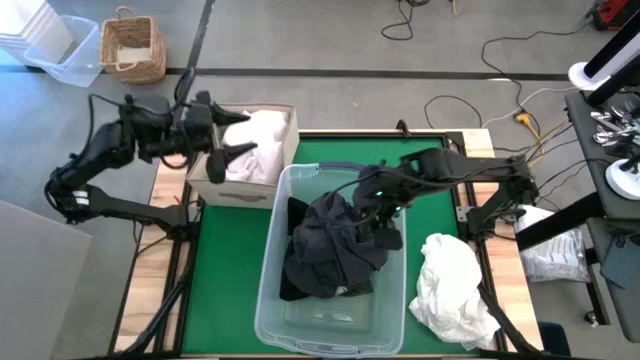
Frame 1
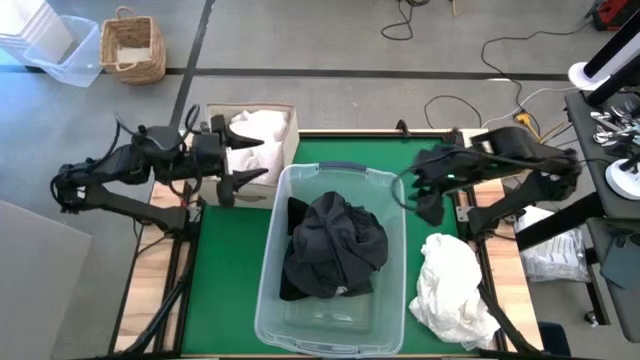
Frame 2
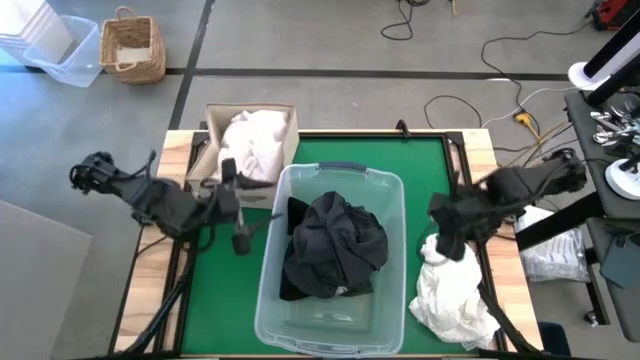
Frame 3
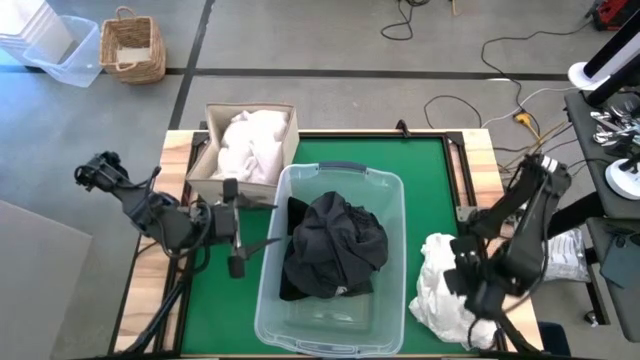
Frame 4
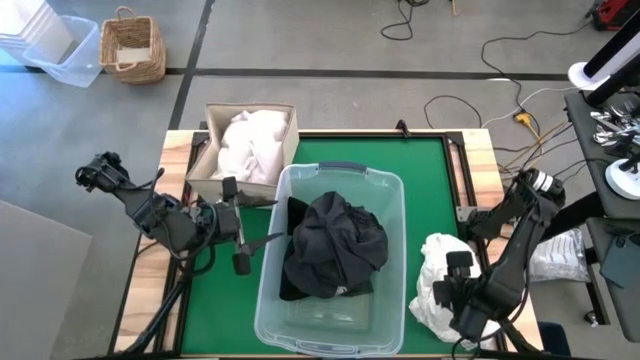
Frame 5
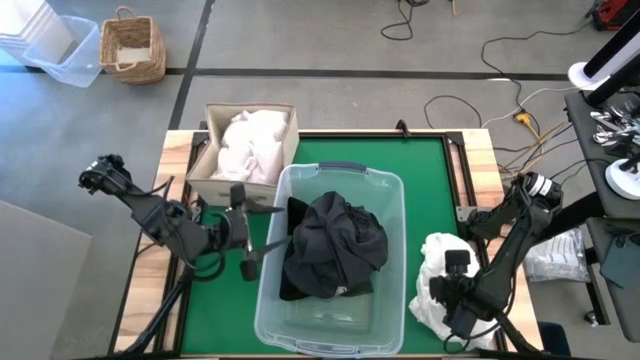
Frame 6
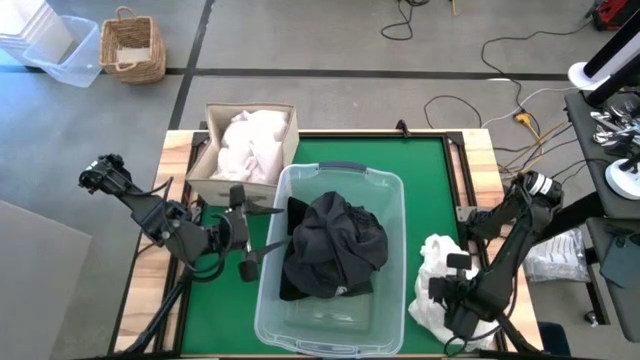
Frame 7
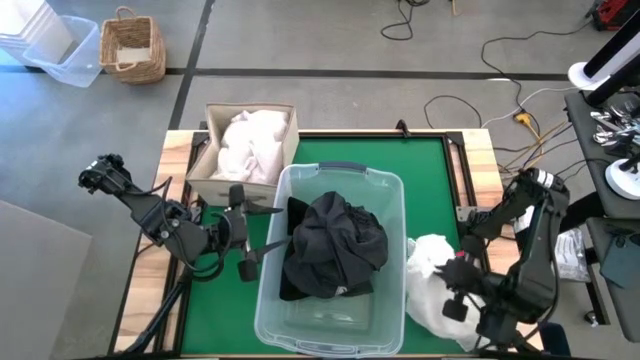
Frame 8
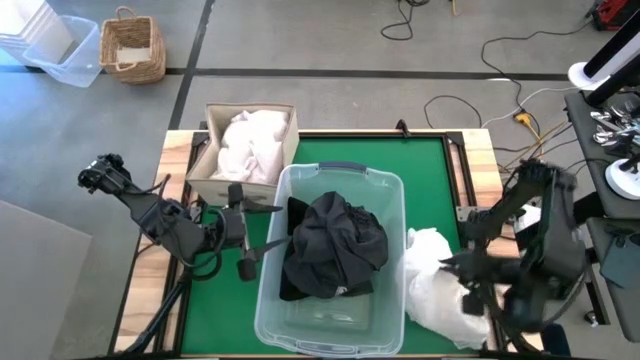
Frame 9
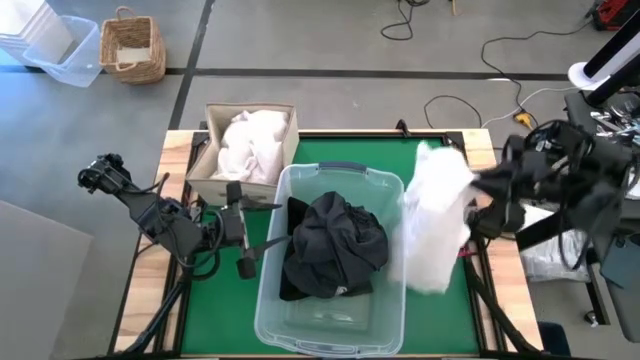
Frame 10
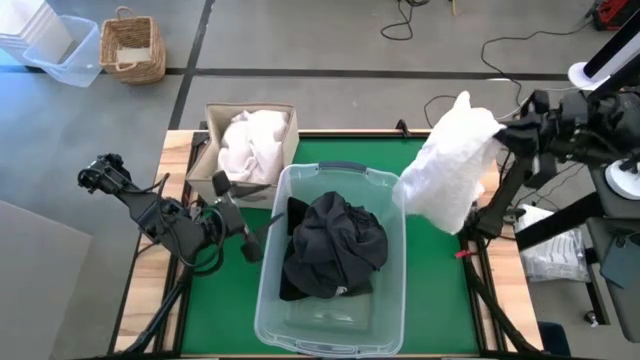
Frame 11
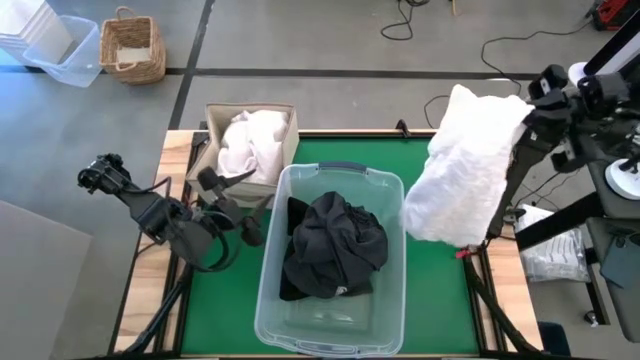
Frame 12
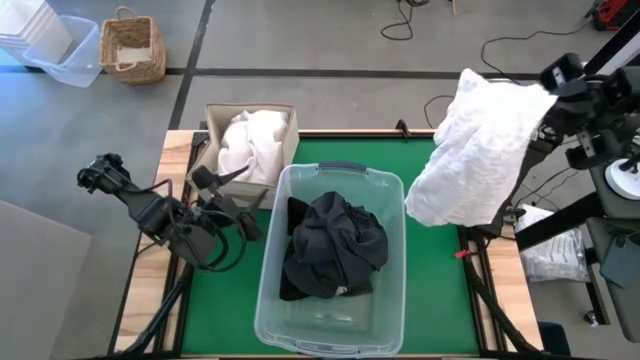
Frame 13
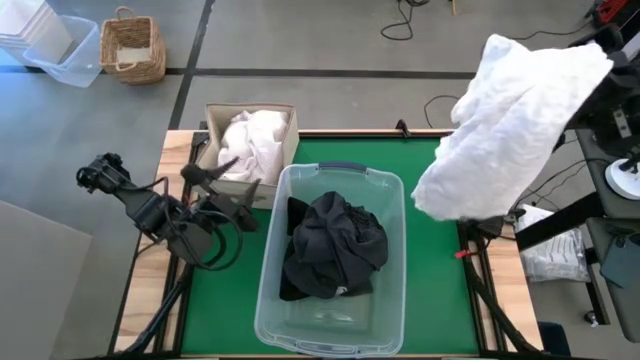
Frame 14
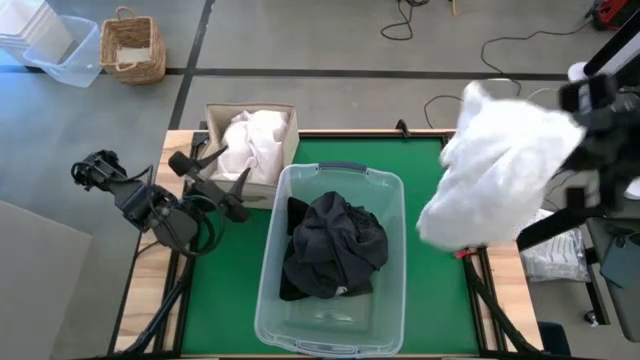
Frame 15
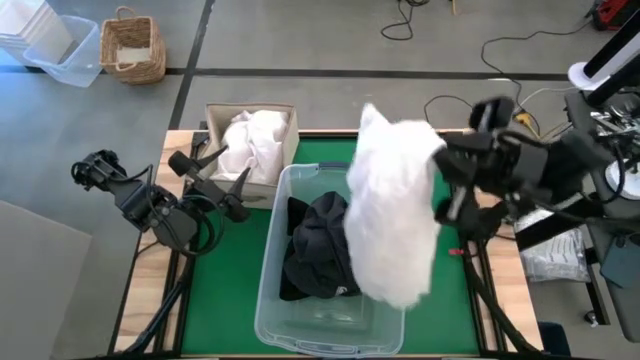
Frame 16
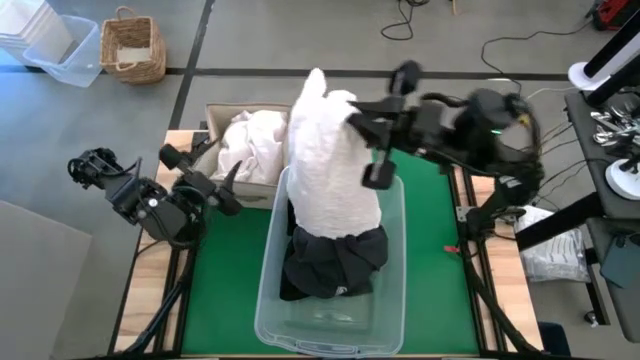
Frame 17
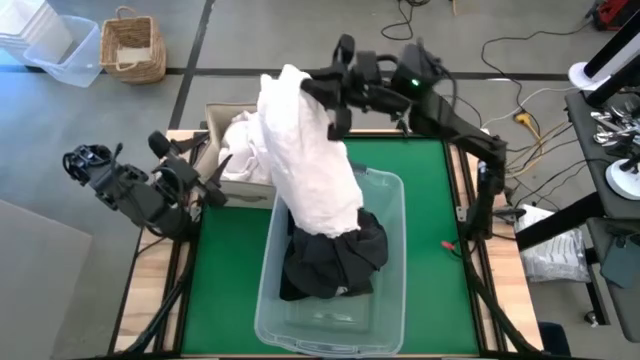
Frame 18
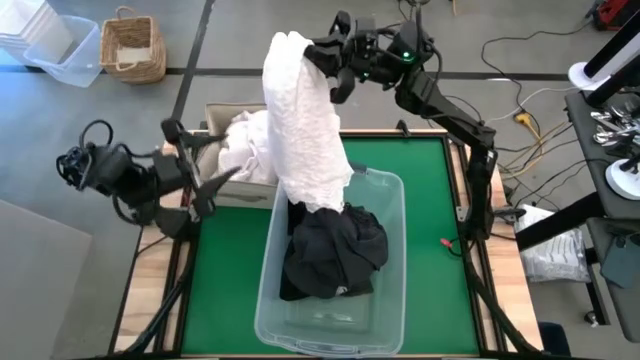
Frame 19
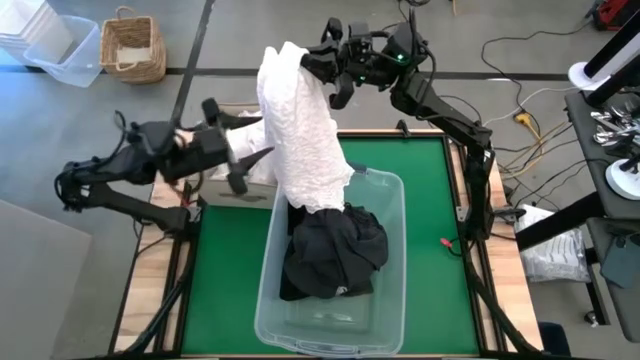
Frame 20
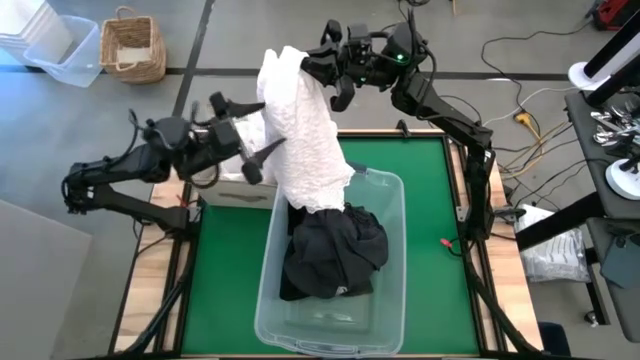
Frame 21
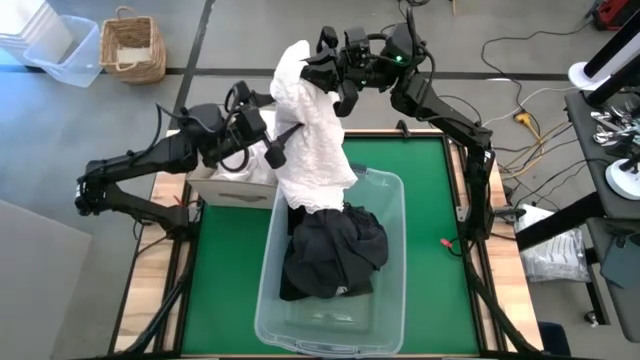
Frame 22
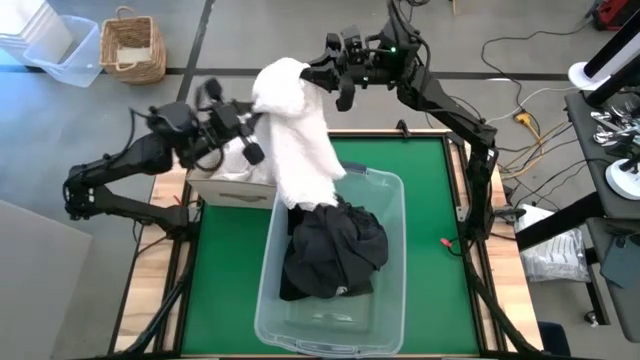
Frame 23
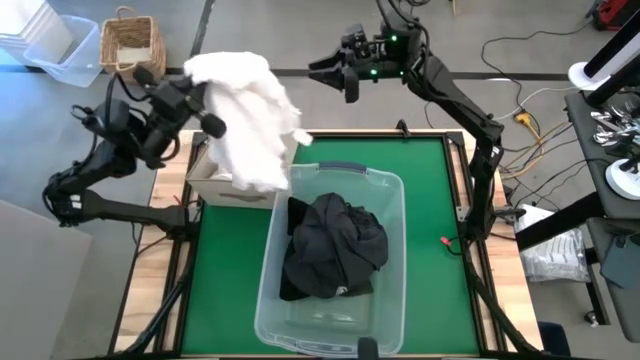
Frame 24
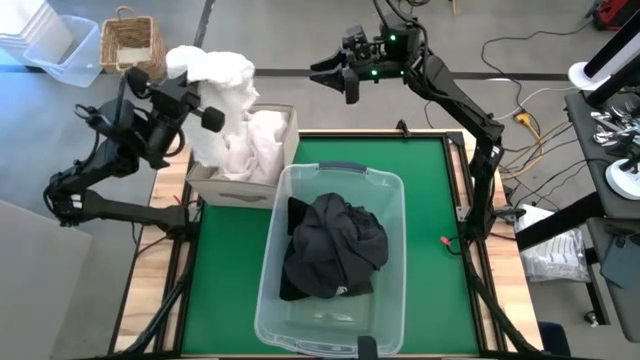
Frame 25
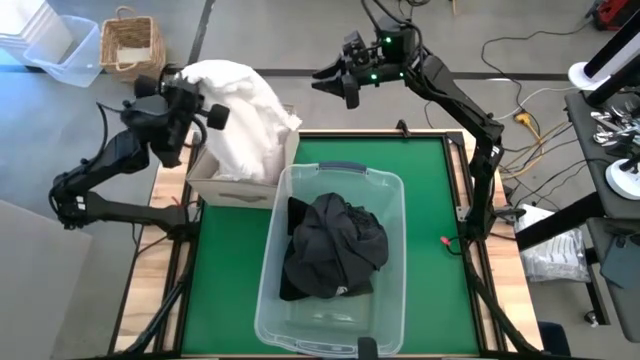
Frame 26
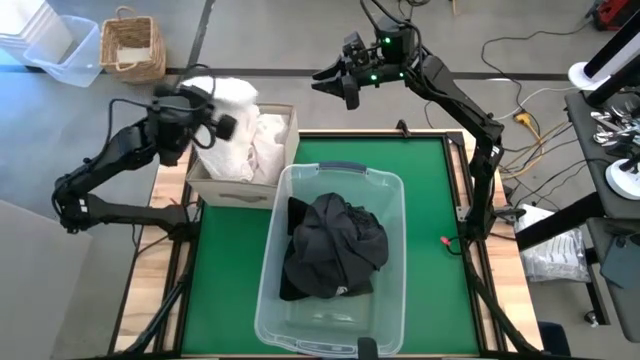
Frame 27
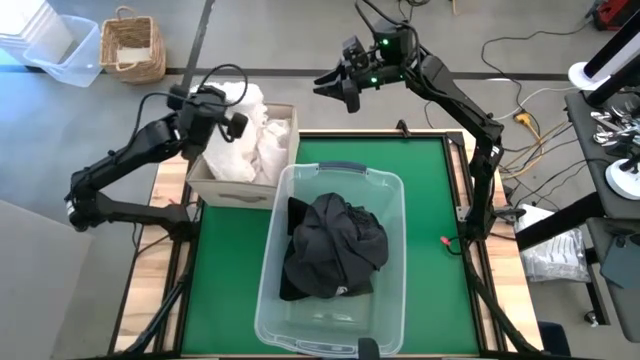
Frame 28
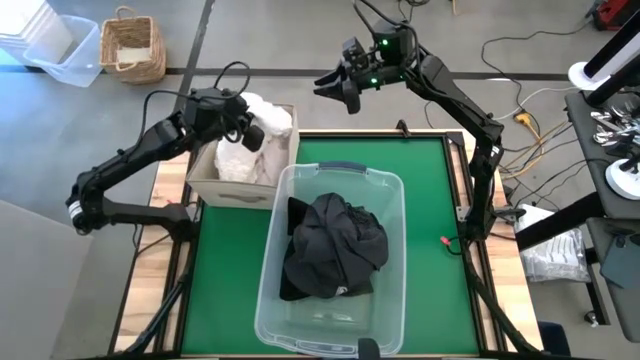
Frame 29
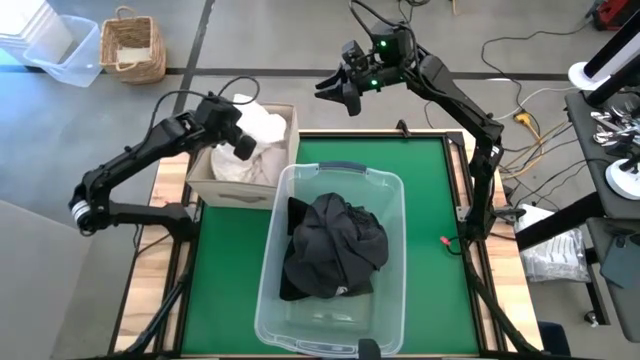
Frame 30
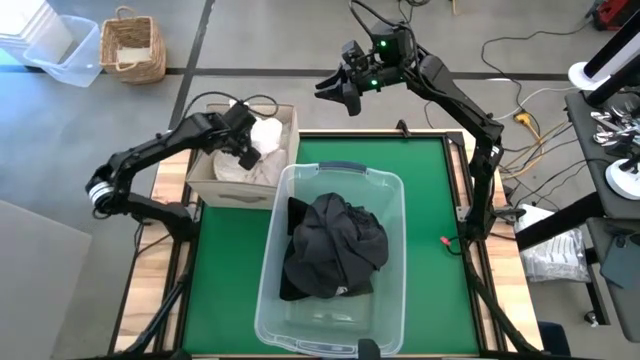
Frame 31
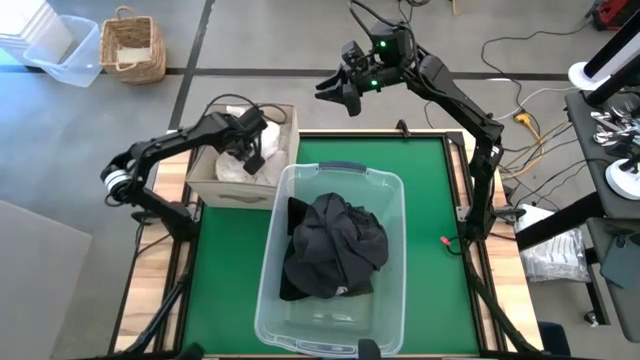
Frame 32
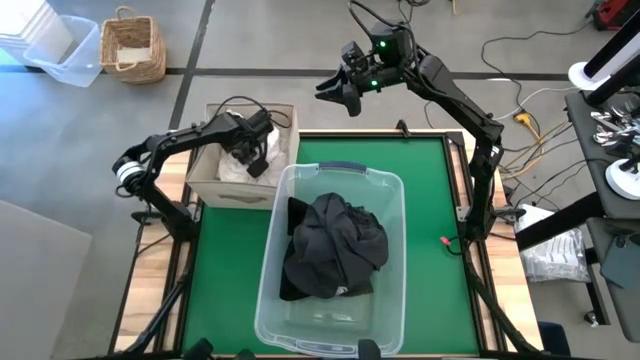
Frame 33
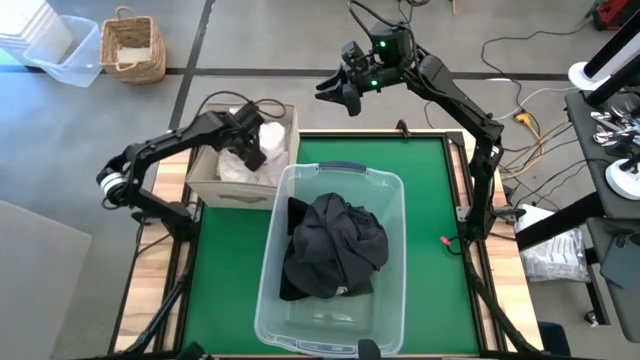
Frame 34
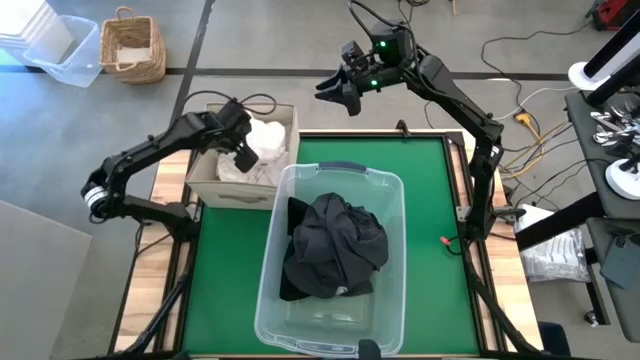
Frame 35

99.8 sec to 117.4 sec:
Put the white blouse into the laundry organizer
